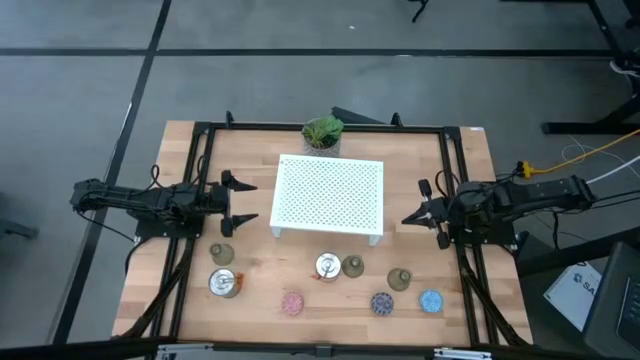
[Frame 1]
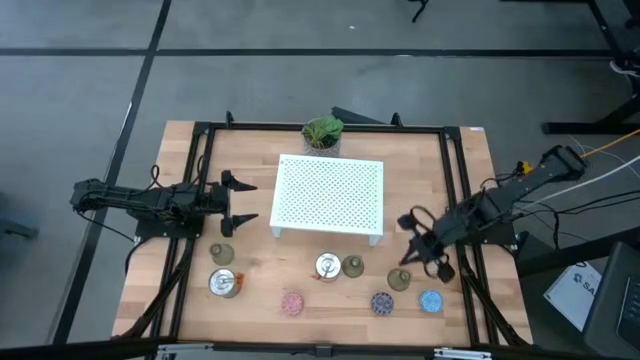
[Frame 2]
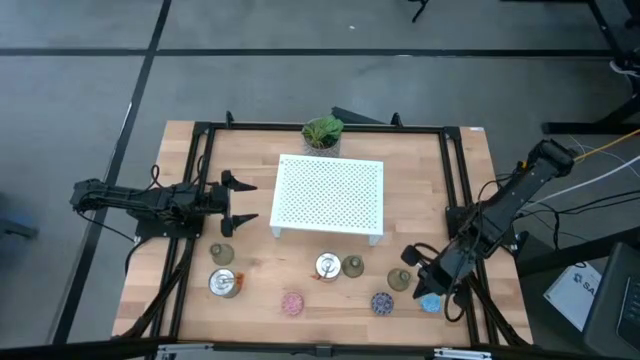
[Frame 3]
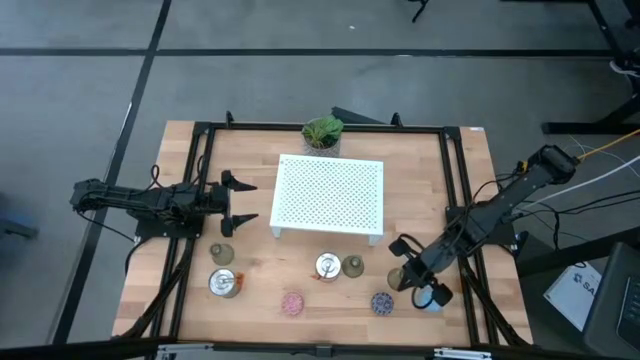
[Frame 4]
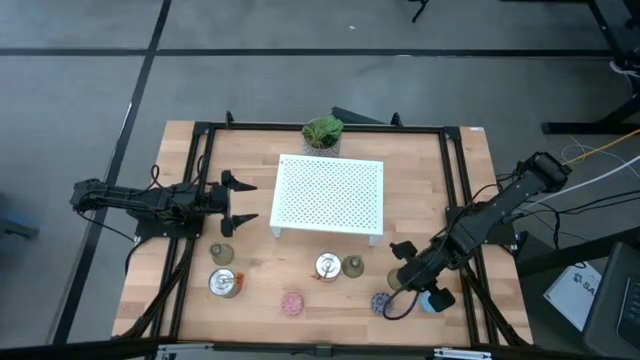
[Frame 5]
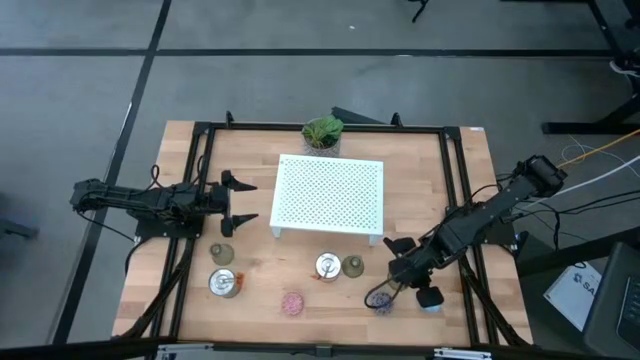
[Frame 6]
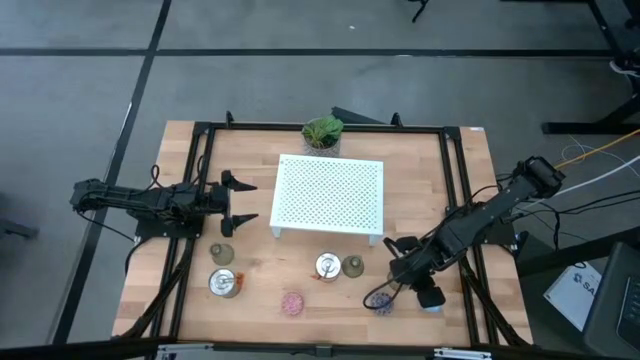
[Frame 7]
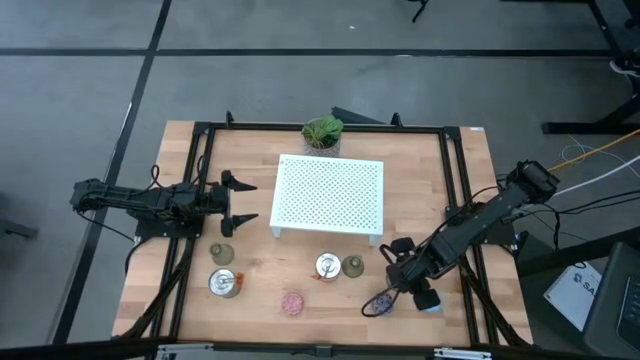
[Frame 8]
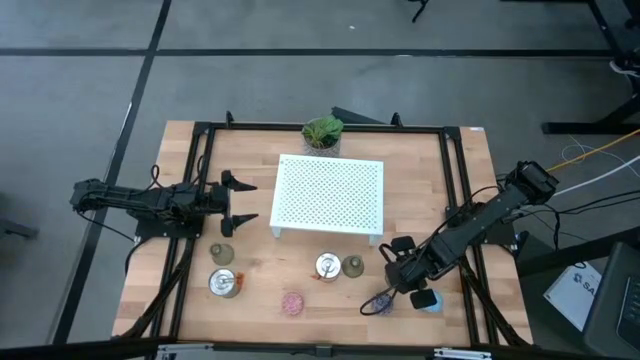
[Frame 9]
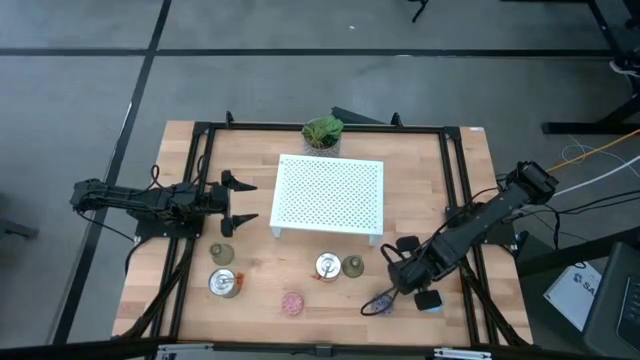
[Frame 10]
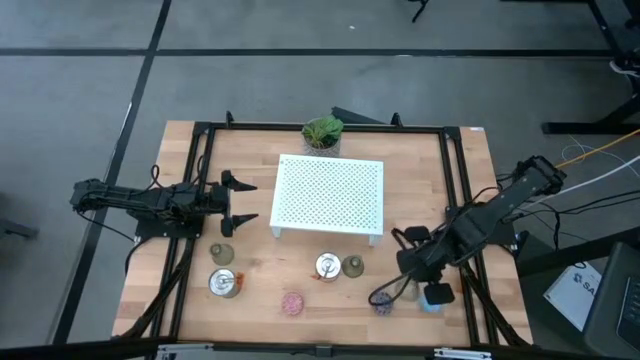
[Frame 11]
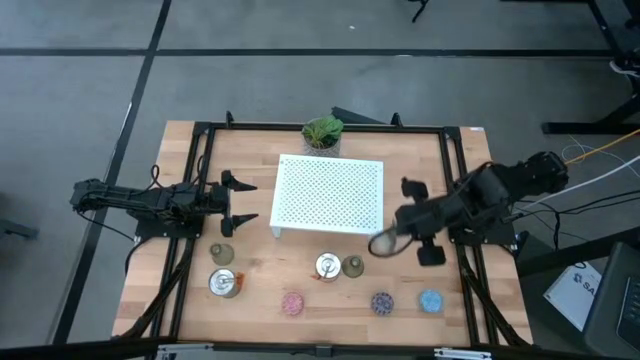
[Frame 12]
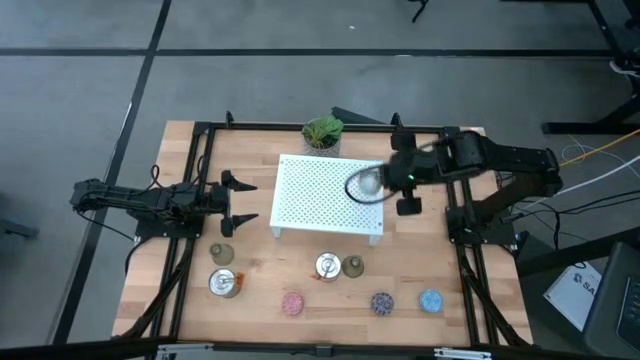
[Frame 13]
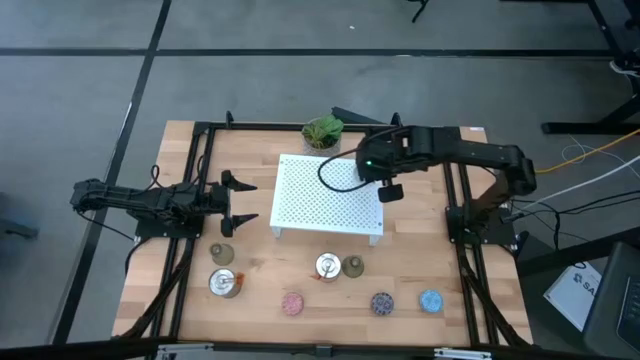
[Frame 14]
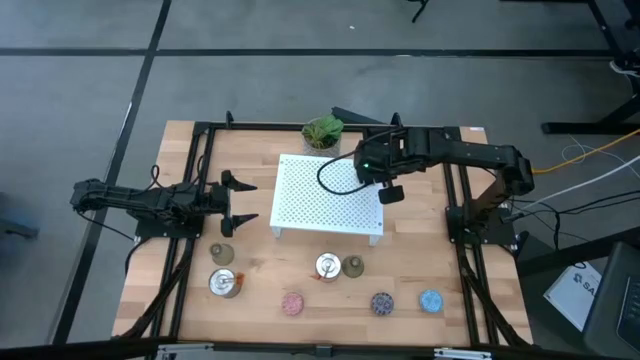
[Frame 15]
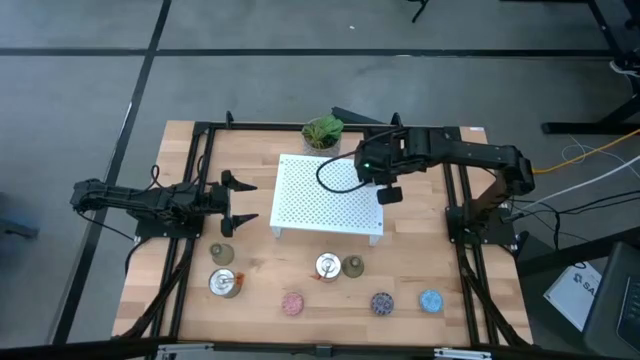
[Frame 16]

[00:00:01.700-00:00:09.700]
Task: Stock candles and vases on shelf
Put the right transparent vase on the shelf

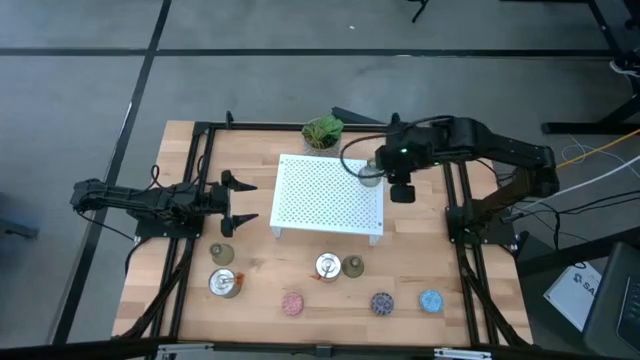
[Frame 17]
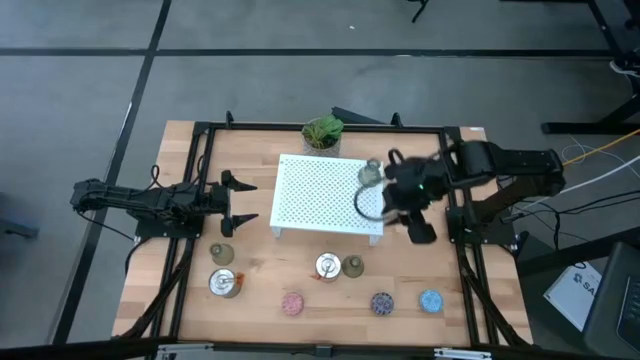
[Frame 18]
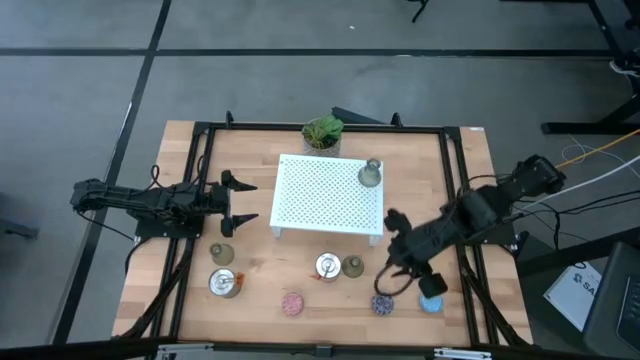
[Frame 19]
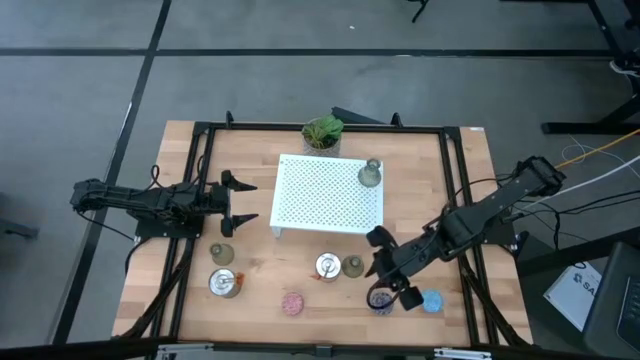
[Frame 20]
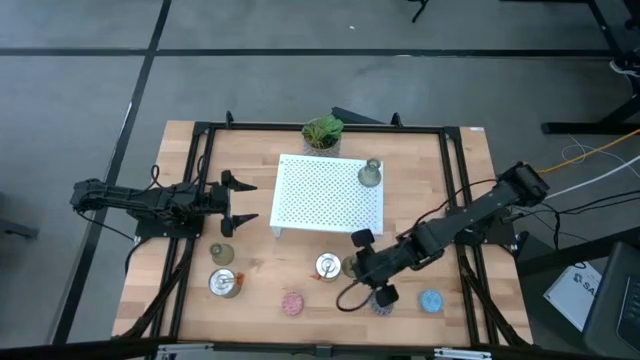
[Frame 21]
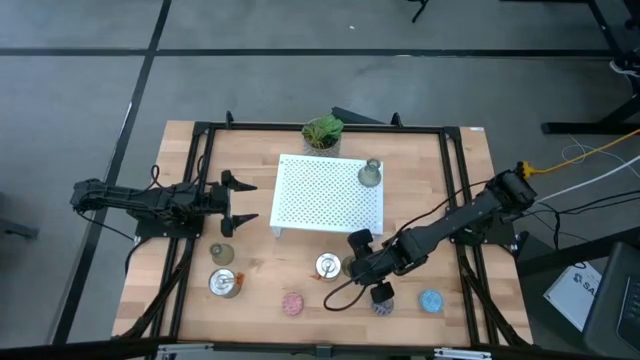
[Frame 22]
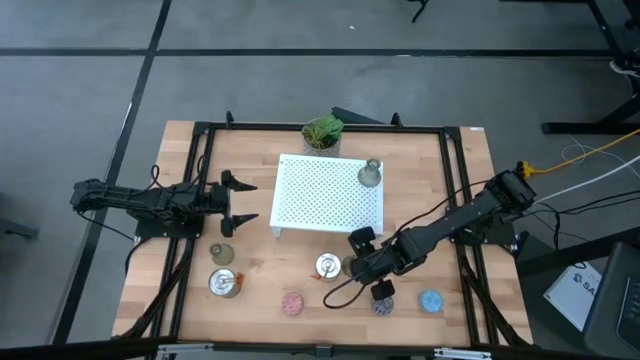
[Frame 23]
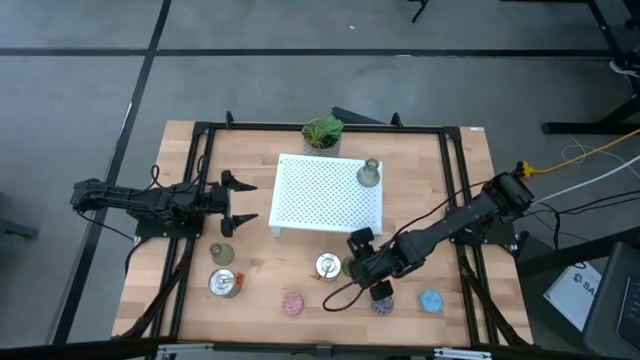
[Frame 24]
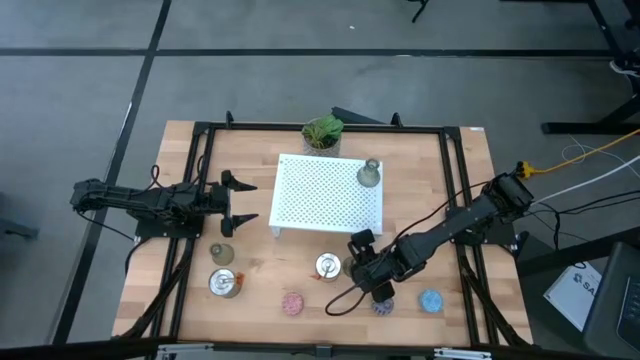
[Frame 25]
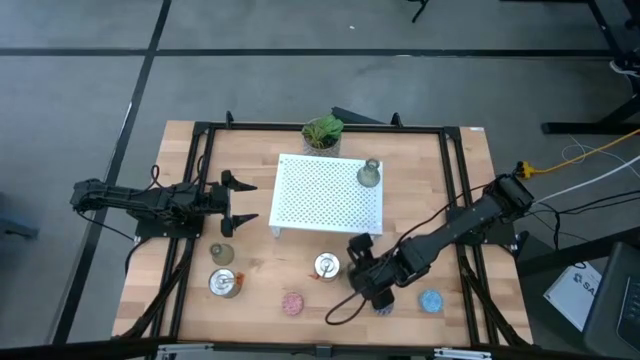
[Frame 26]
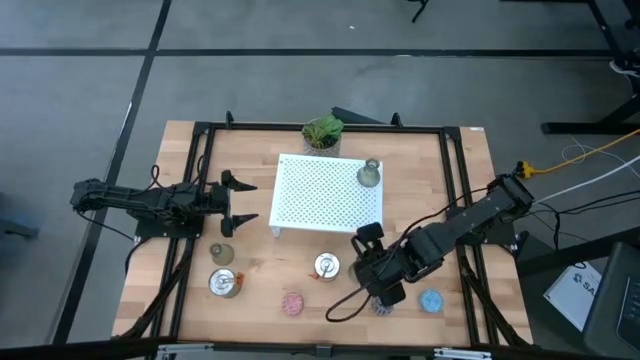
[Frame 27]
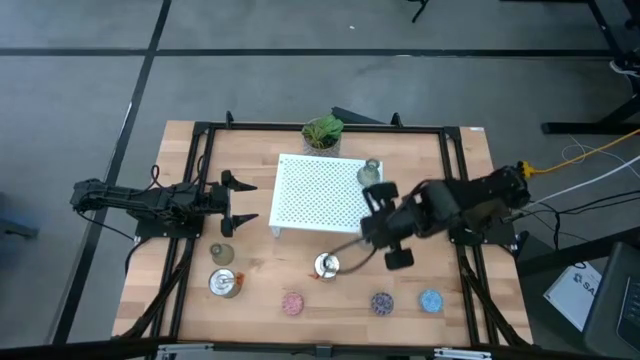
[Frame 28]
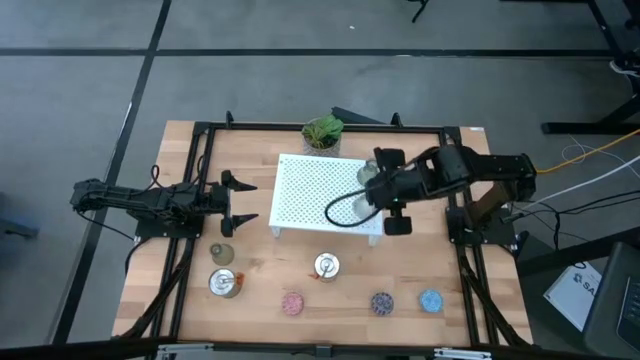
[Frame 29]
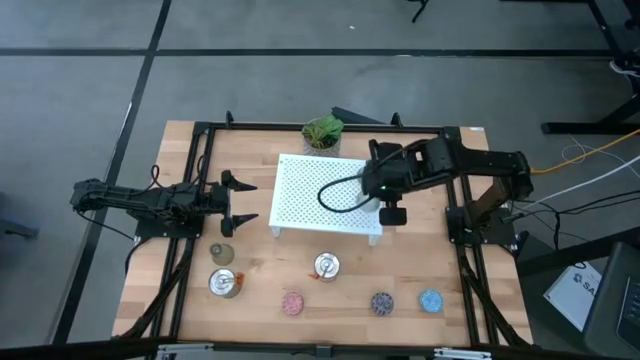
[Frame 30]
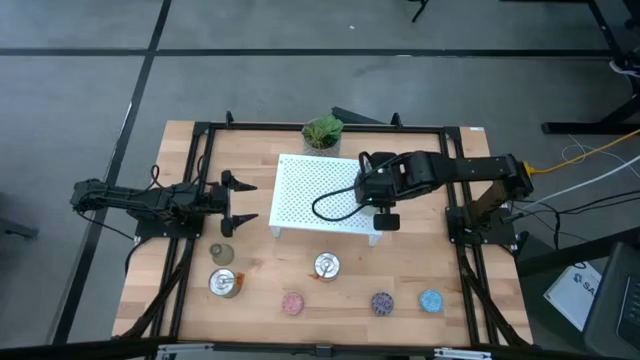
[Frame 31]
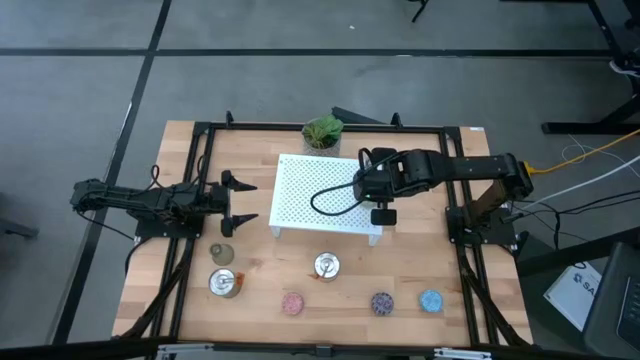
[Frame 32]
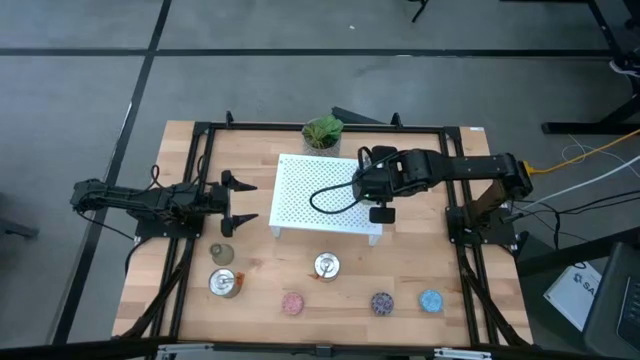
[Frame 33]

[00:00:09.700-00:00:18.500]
Align the right transparent vases with the other transparent vases on the shelf

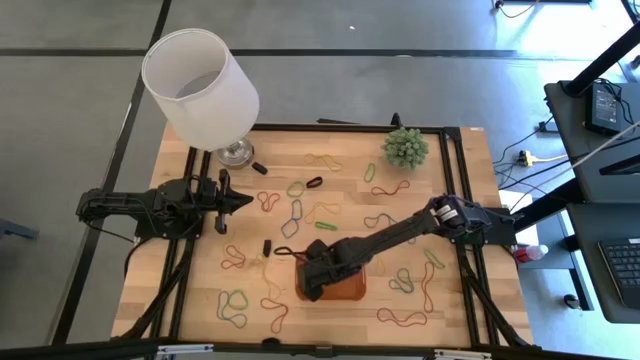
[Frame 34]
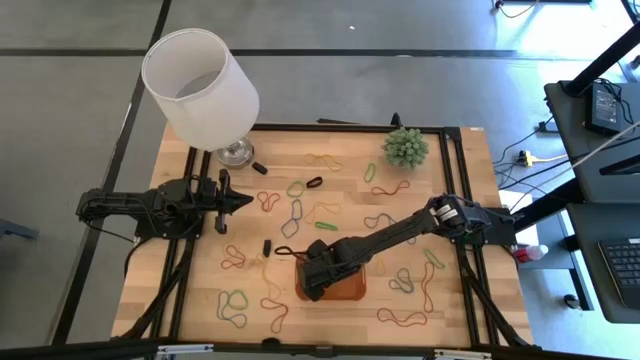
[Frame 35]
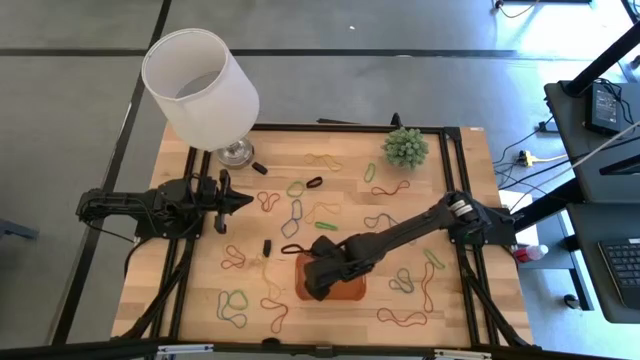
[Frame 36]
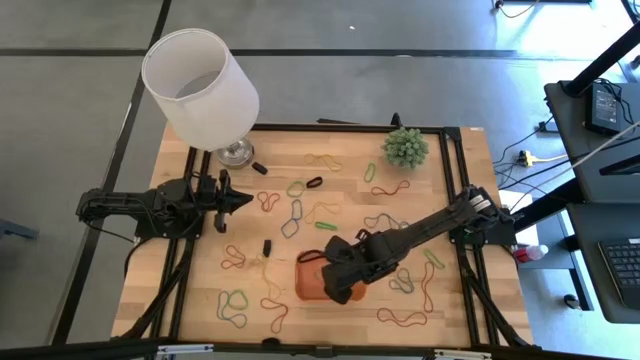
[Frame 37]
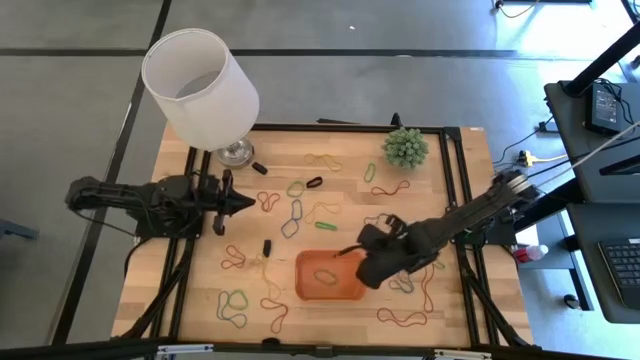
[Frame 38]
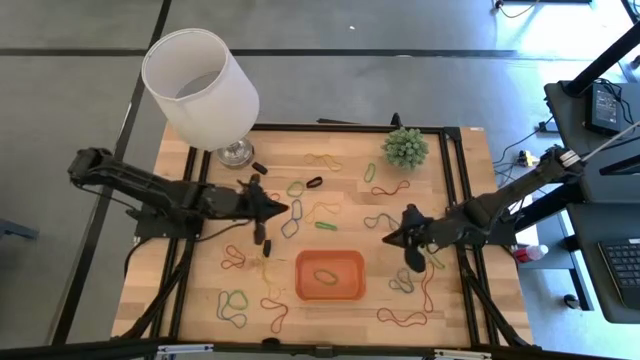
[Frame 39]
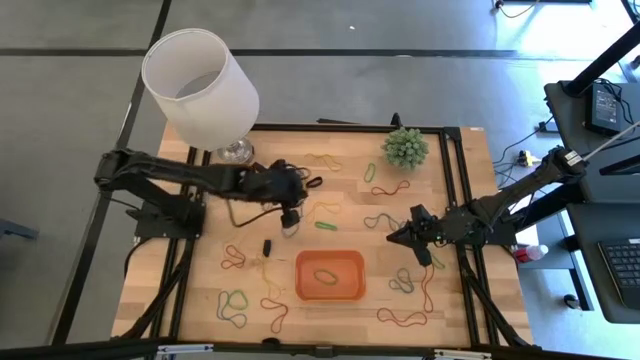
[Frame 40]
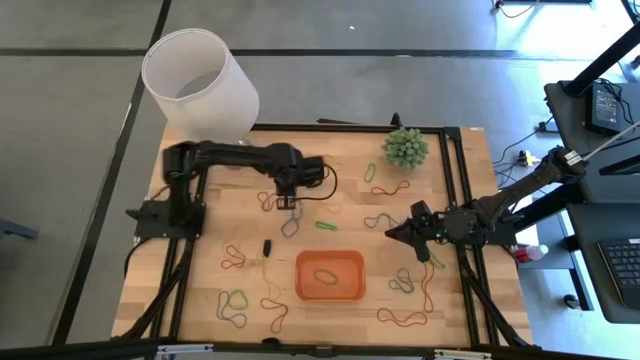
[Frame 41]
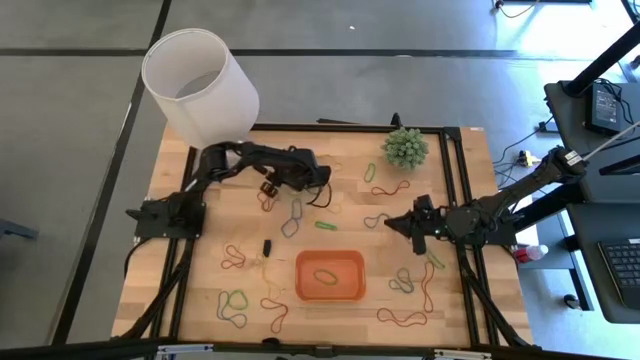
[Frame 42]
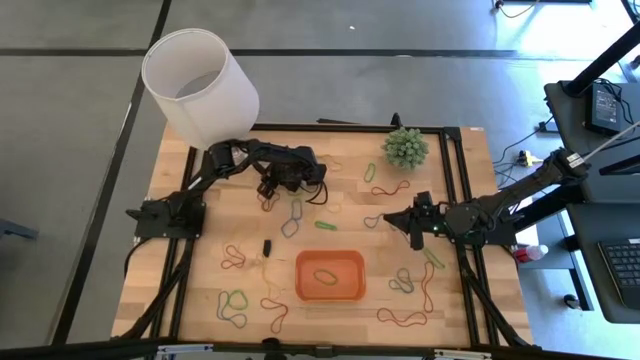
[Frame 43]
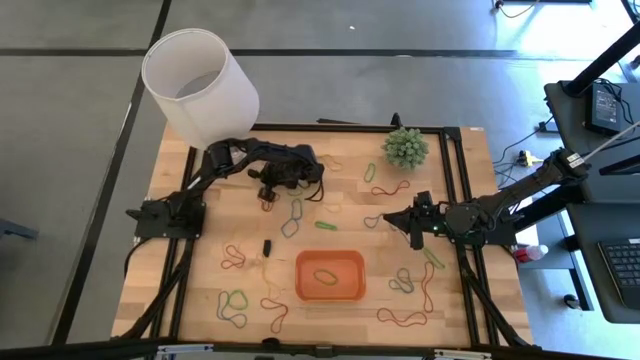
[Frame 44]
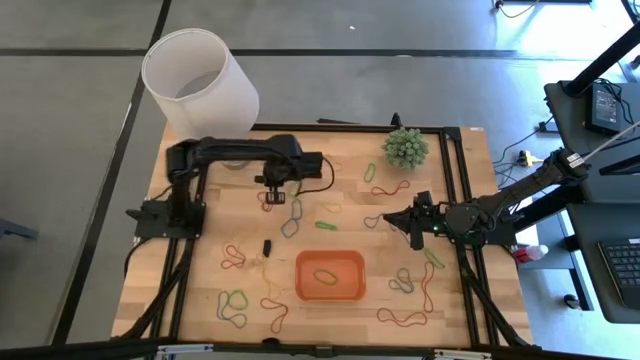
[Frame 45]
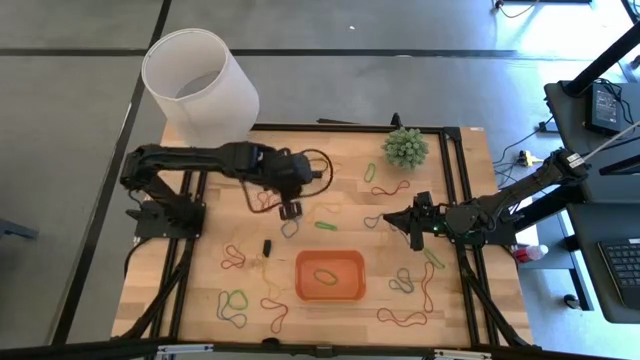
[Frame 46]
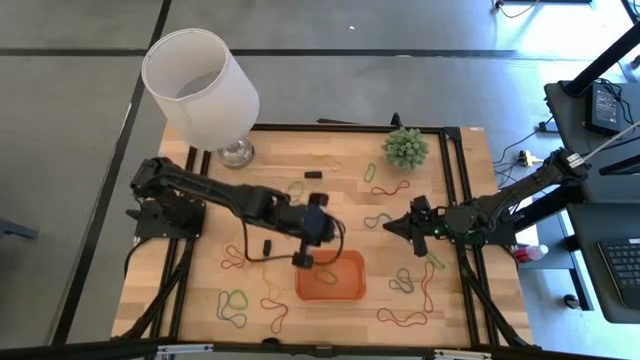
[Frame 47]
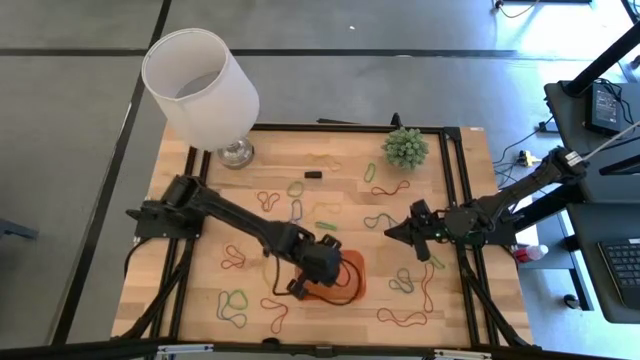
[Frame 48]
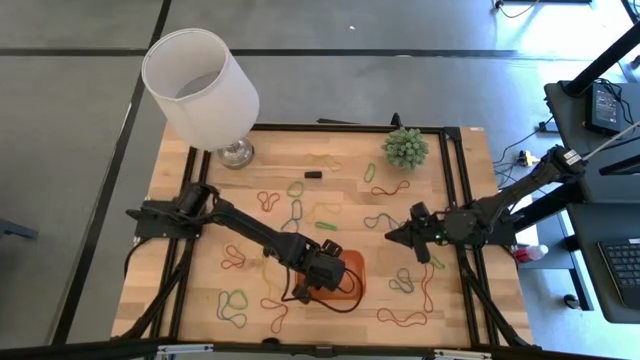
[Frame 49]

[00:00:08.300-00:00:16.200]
Task: Pick and place rubber bands into bin
Put the black rubber band into the orange bin
